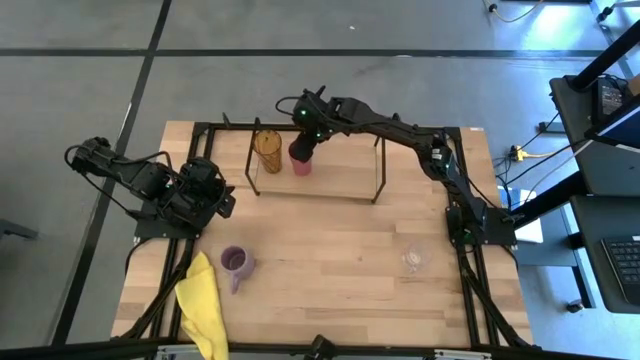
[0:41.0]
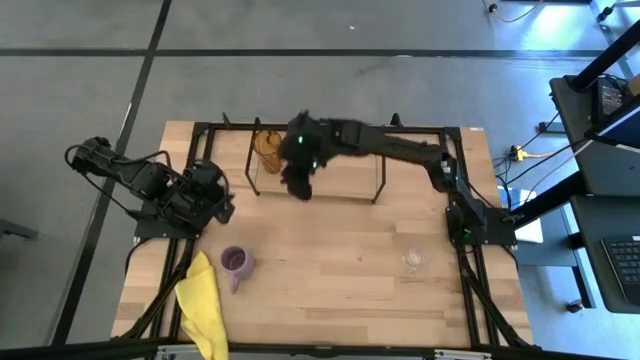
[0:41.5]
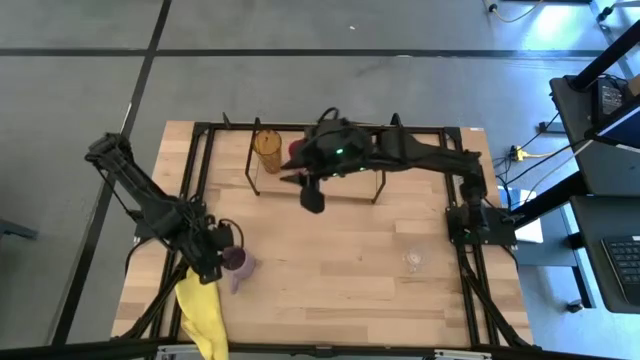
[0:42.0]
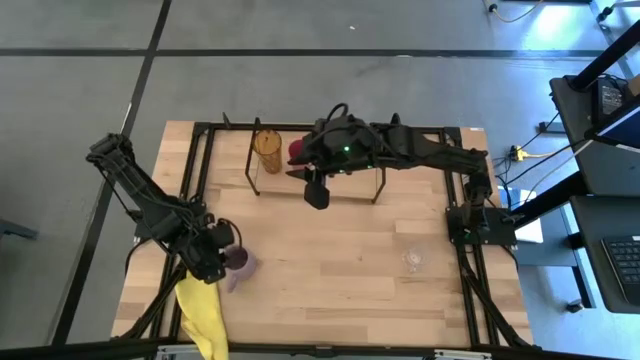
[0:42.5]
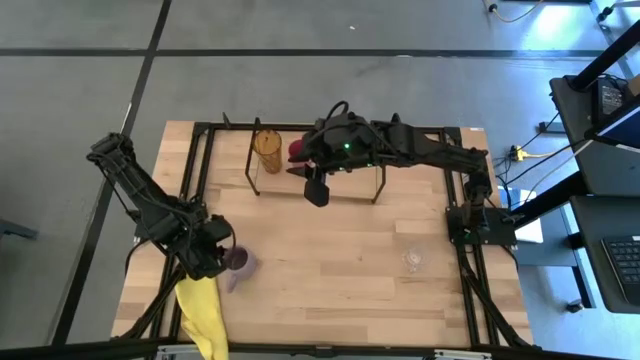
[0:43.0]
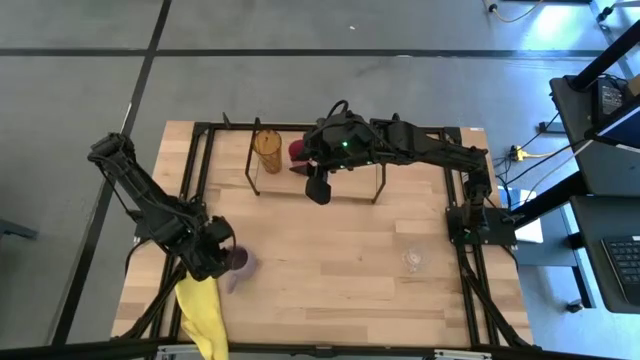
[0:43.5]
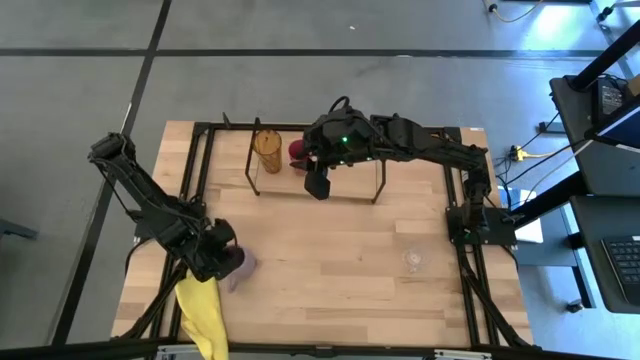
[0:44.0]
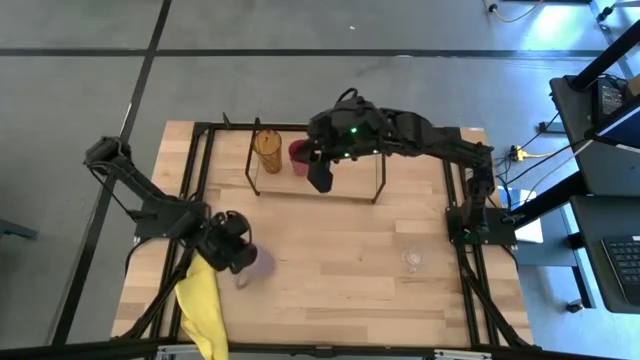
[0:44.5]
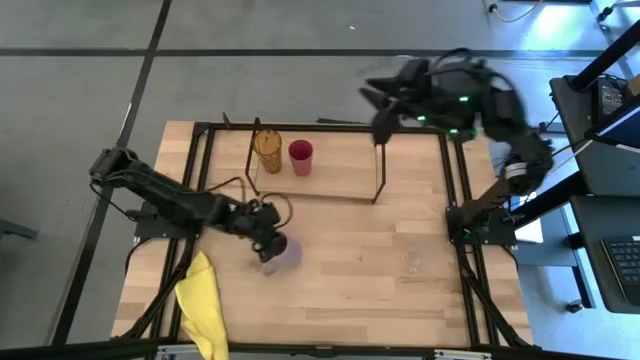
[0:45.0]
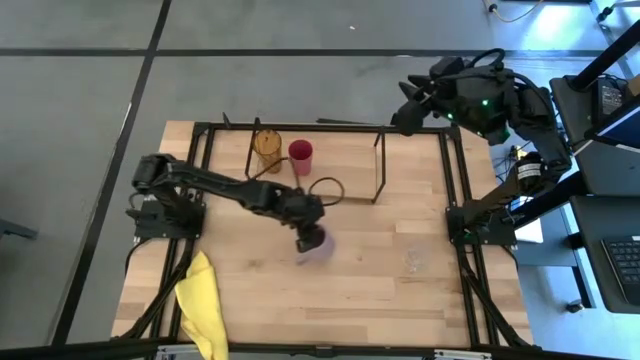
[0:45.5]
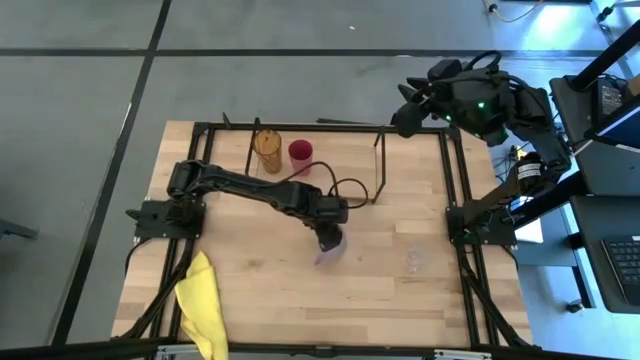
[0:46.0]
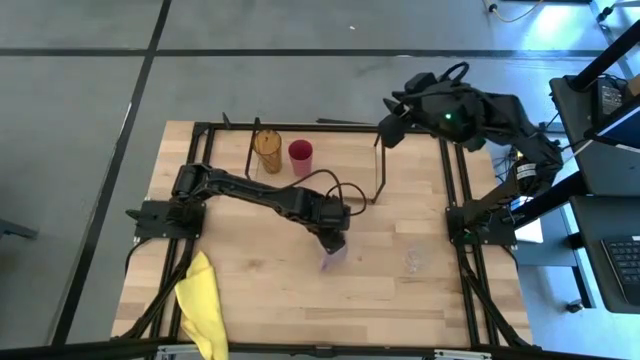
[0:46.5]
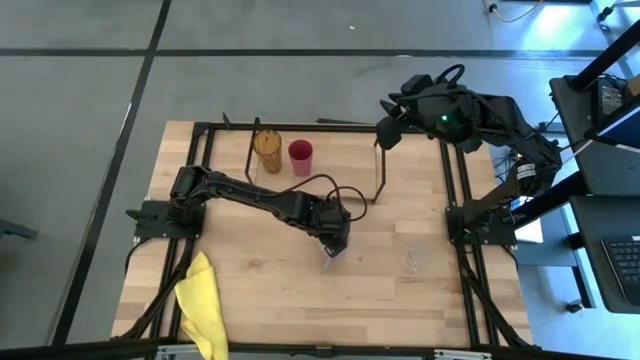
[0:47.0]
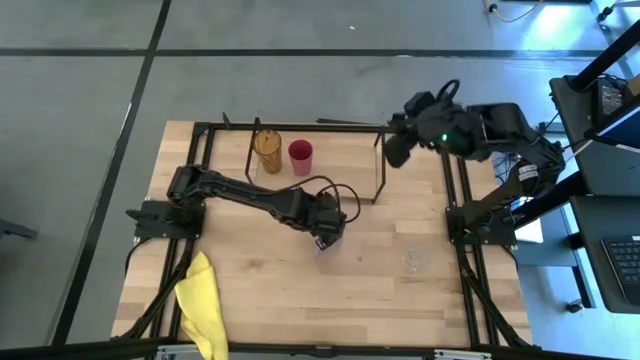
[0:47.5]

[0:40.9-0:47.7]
Task: Stack small to large cups/mugs on shelf
Prepare the purple mug on the table

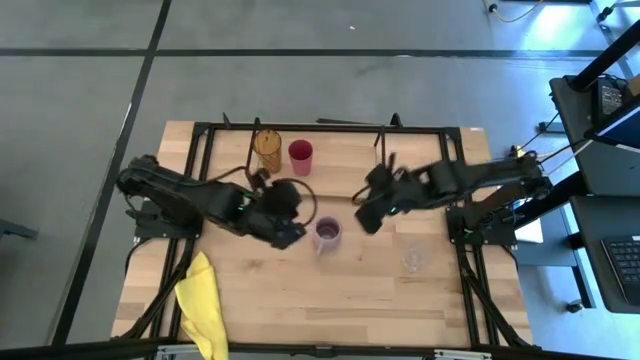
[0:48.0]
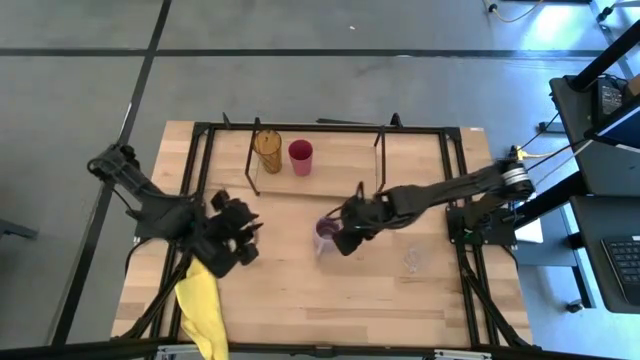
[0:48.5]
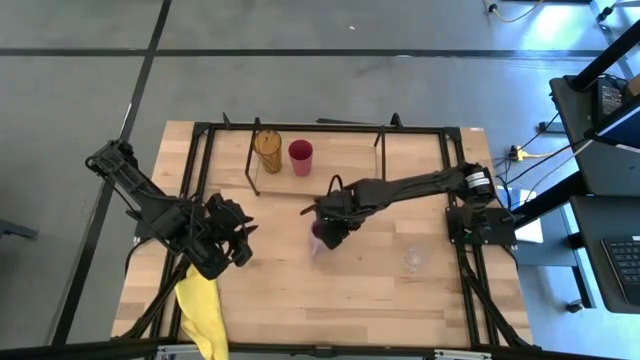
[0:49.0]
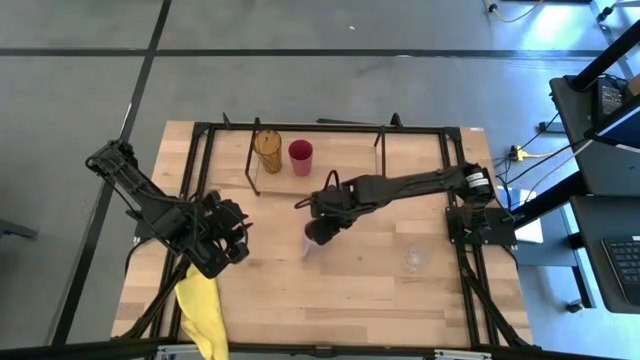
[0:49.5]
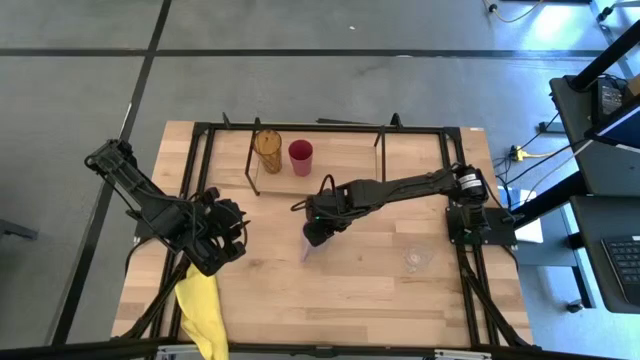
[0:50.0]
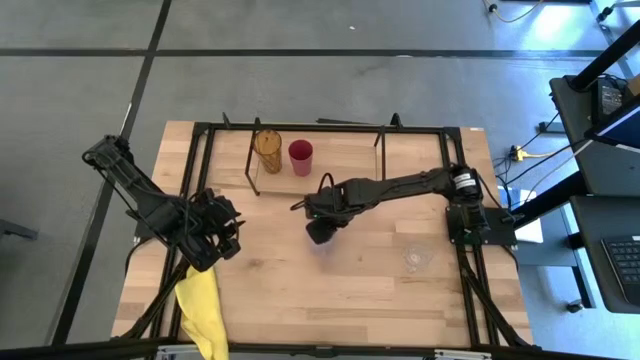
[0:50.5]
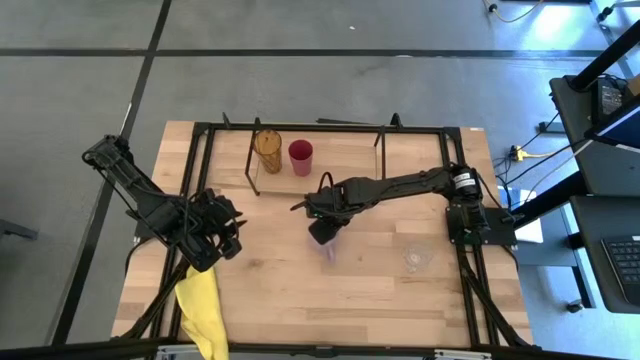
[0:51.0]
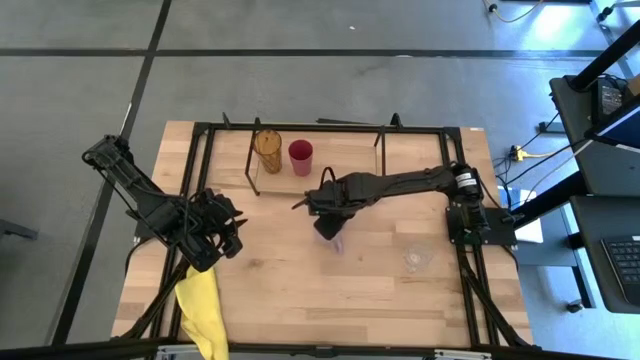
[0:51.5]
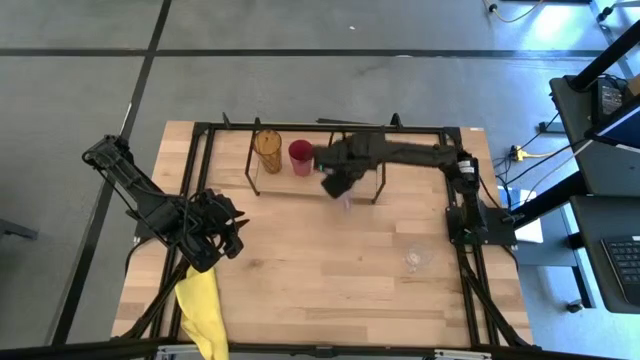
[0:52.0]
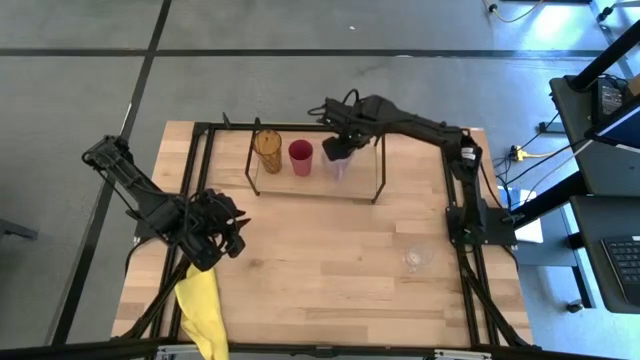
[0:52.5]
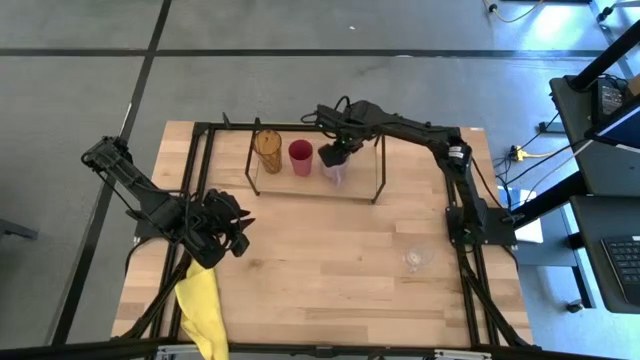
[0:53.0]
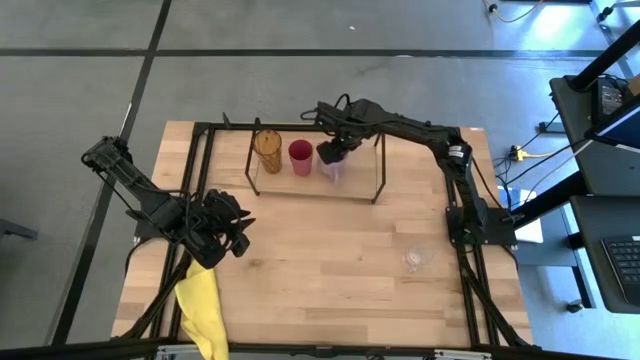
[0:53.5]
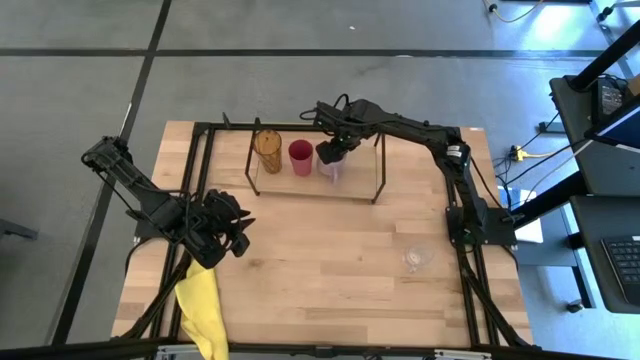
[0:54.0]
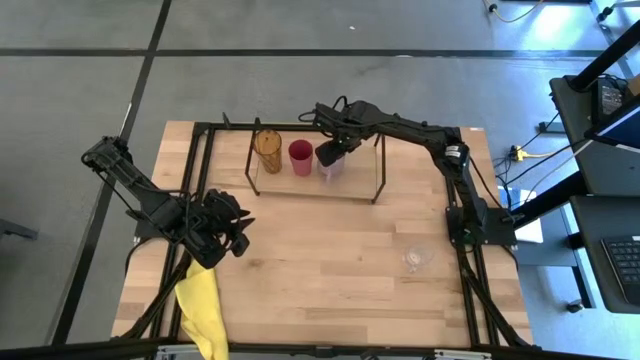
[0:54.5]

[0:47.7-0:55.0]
Put the purple mug on the shelf

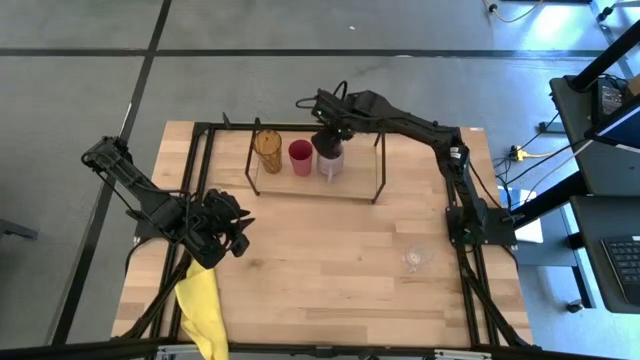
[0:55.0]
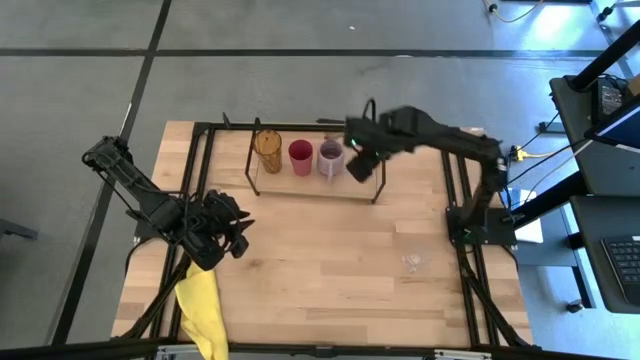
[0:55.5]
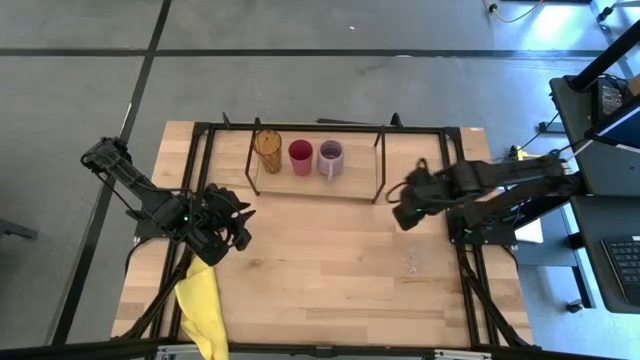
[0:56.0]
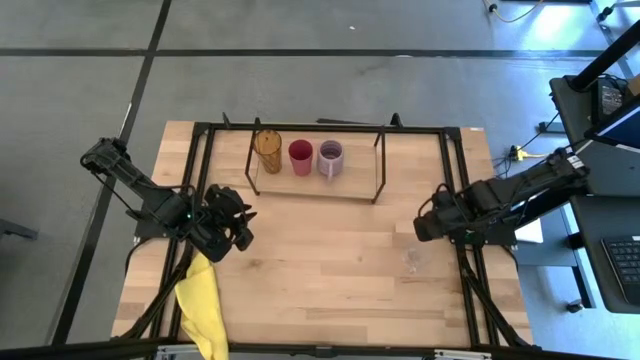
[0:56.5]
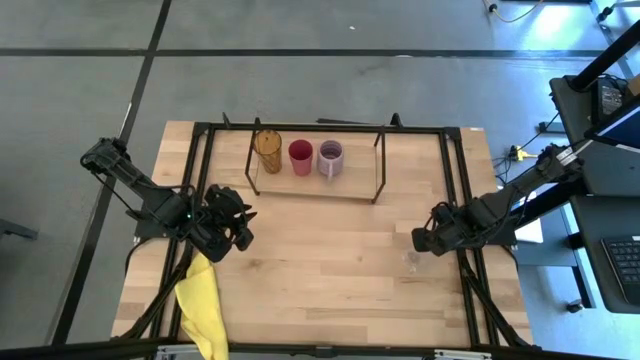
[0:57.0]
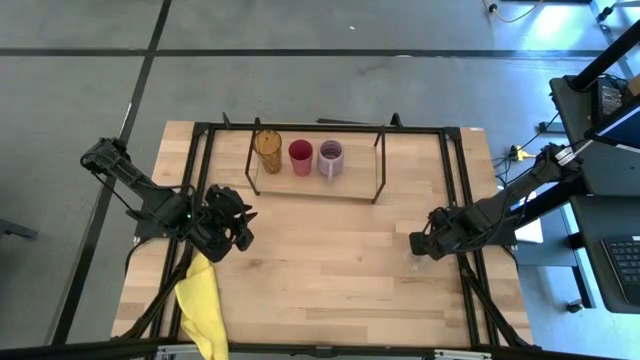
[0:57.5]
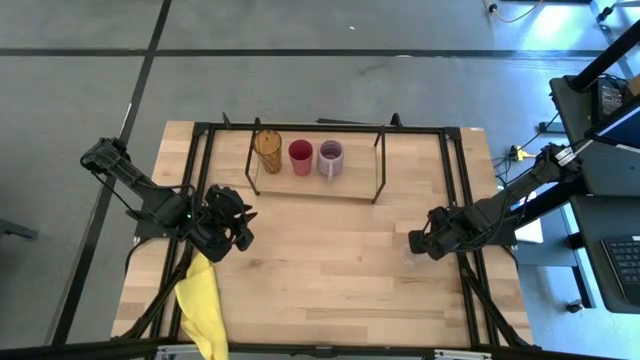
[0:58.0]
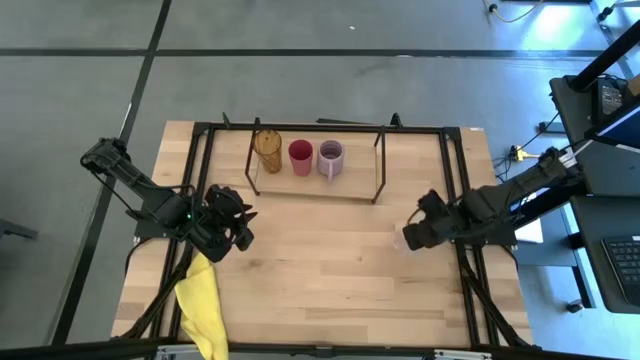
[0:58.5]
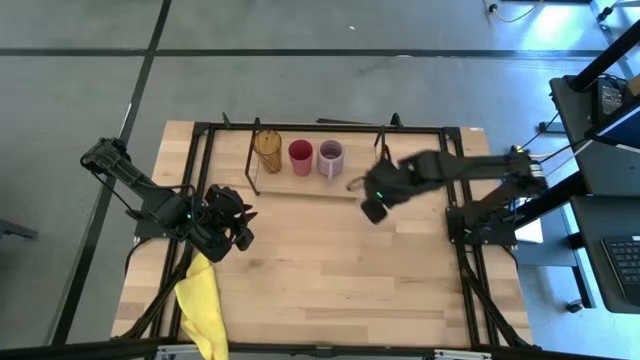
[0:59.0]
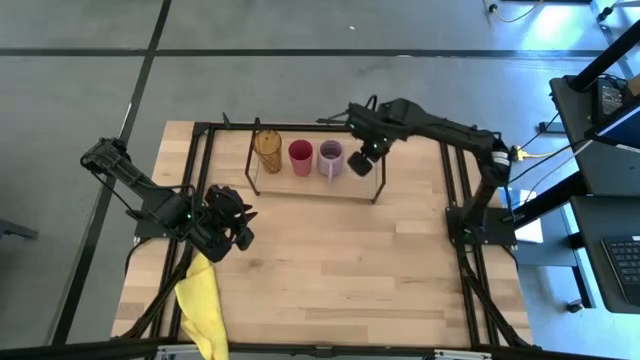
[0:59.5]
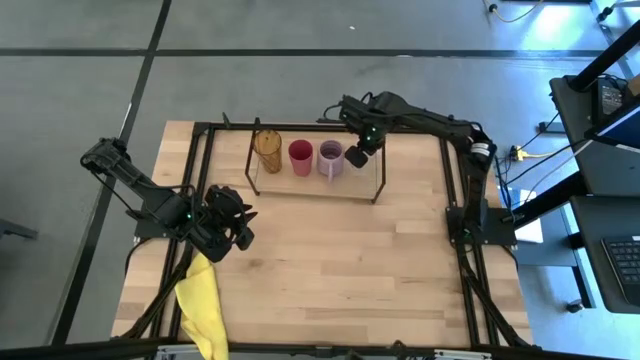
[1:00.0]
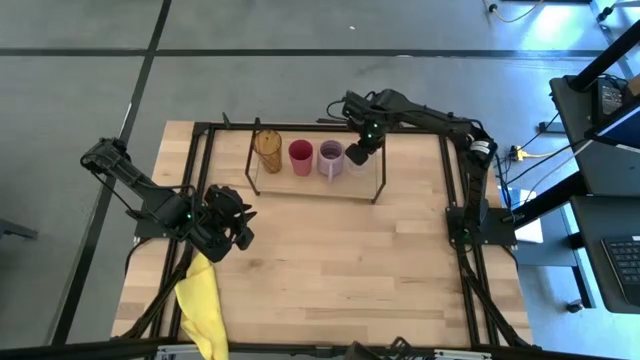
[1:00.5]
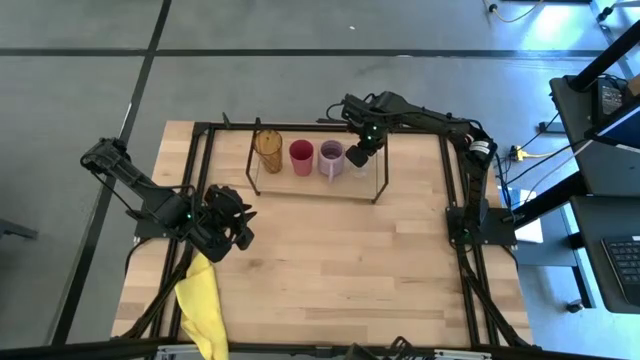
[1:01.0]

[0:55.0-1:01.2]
Put the transparent mug on the shelf

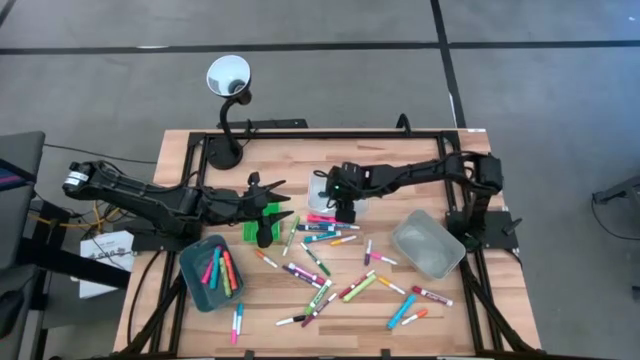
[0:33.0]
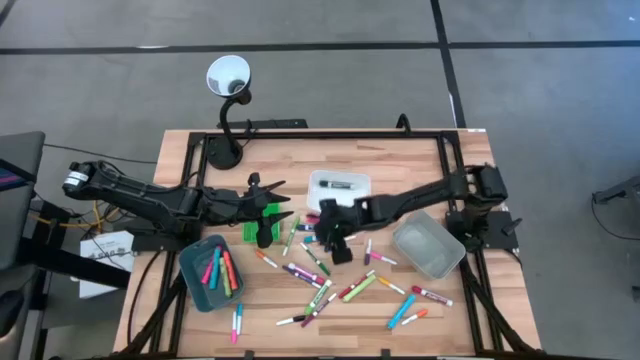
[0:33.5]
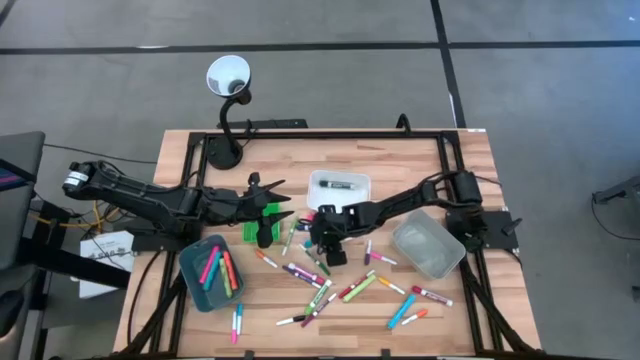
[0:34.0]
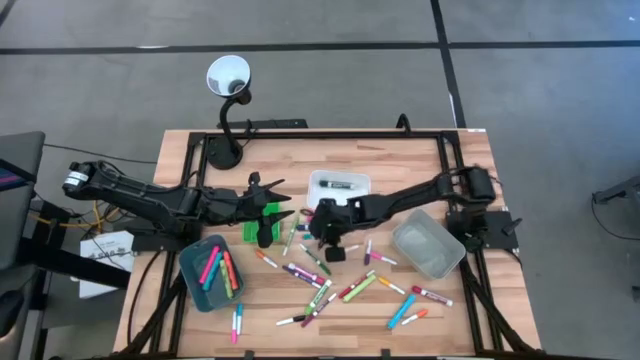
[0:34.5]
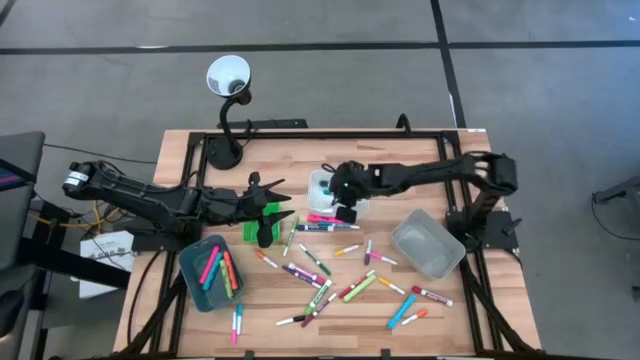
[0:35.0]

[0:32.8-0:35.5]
Task: Pick & Place Markers
Put the big light blue marker pen into the white bin
